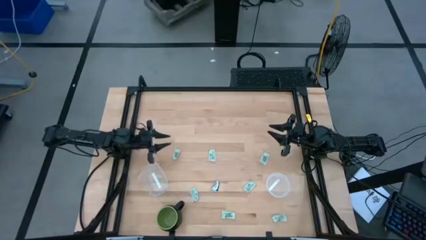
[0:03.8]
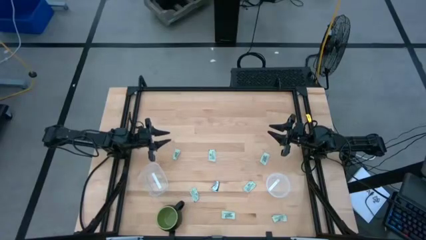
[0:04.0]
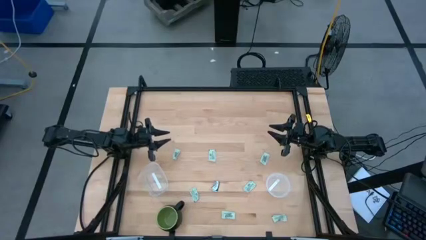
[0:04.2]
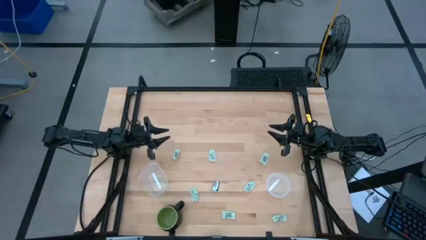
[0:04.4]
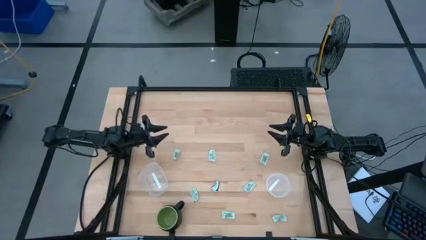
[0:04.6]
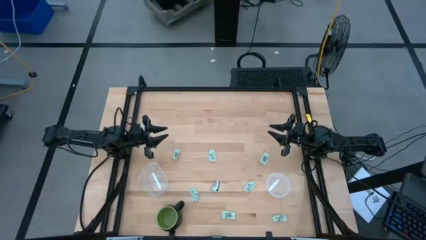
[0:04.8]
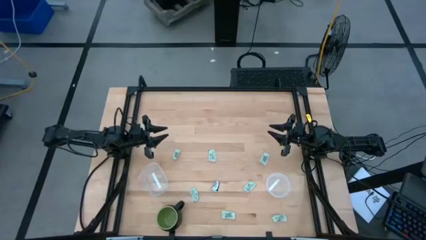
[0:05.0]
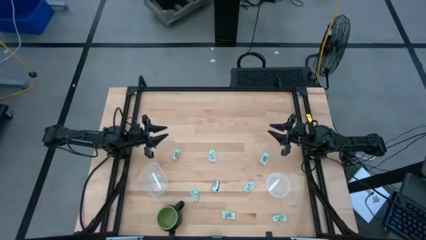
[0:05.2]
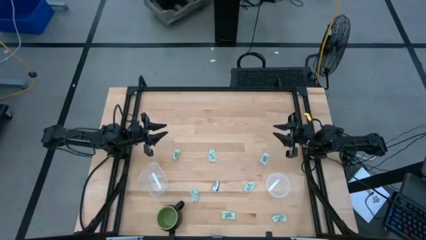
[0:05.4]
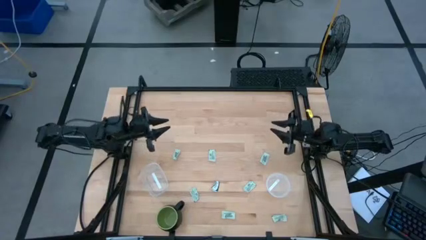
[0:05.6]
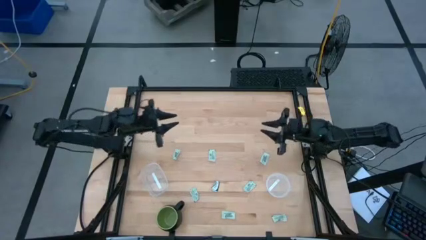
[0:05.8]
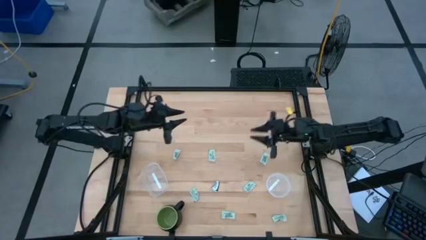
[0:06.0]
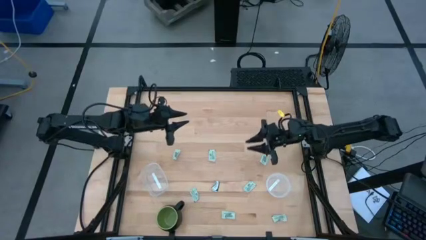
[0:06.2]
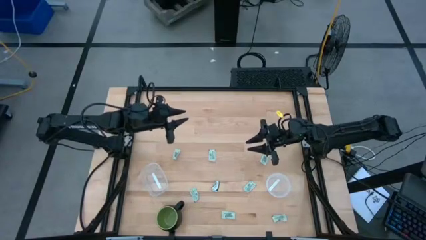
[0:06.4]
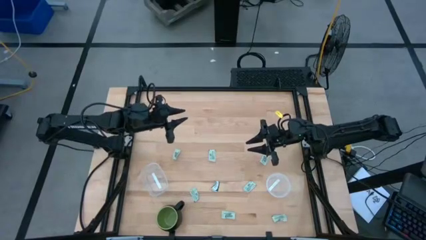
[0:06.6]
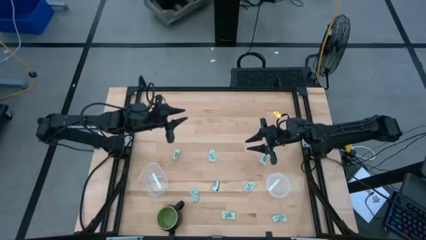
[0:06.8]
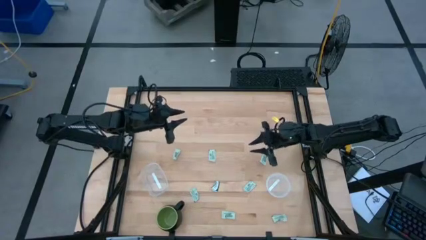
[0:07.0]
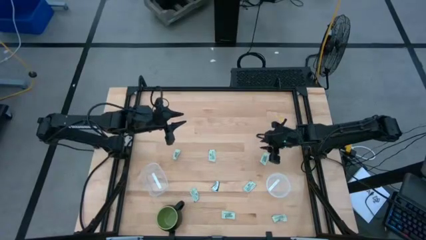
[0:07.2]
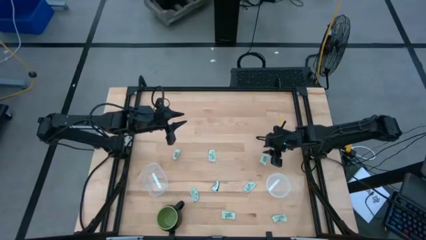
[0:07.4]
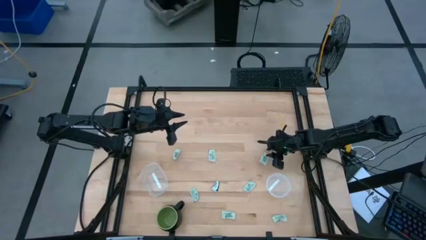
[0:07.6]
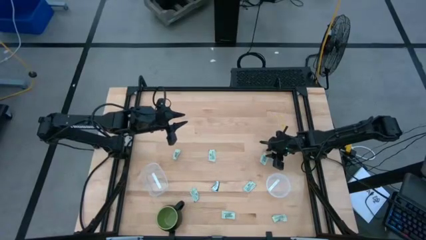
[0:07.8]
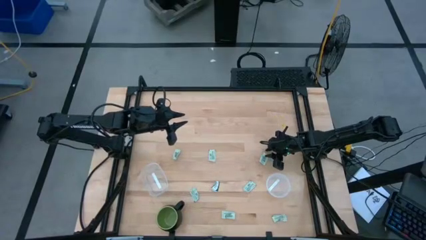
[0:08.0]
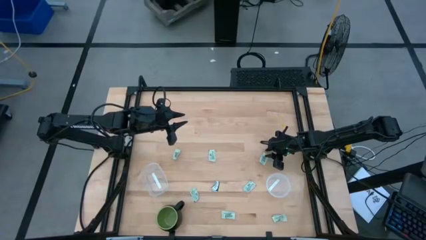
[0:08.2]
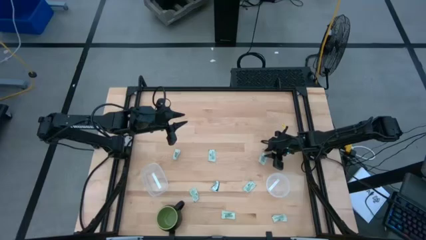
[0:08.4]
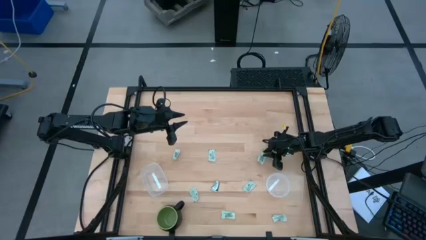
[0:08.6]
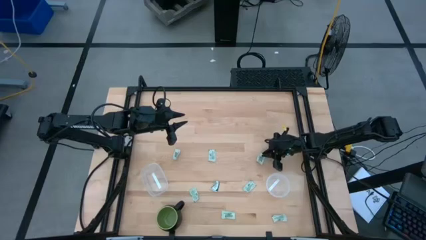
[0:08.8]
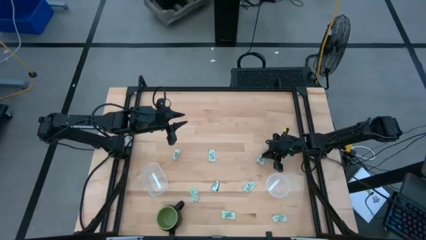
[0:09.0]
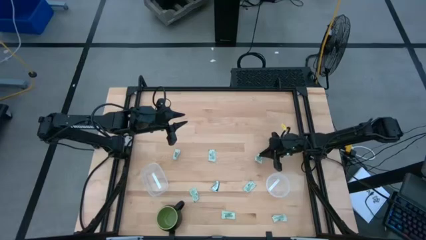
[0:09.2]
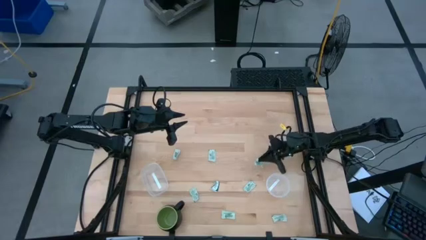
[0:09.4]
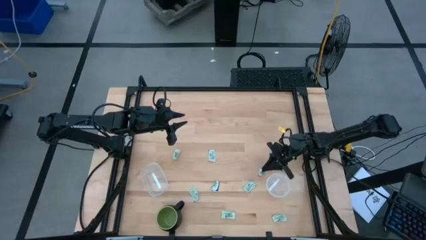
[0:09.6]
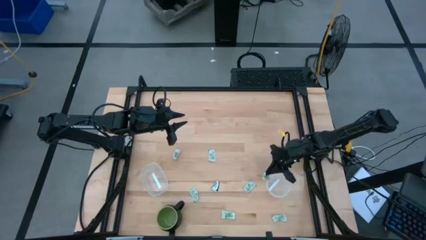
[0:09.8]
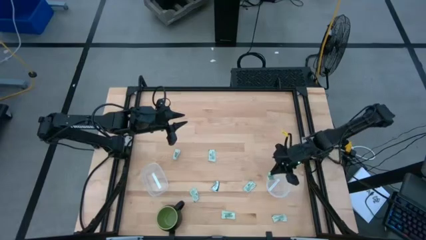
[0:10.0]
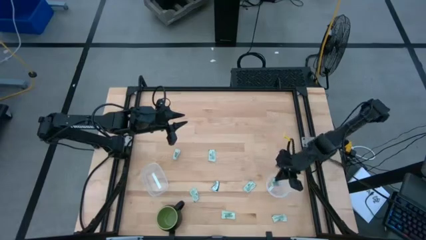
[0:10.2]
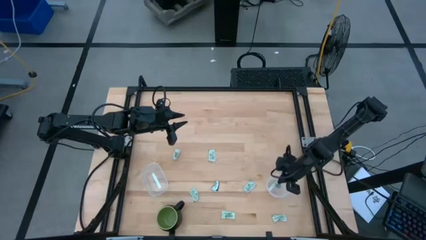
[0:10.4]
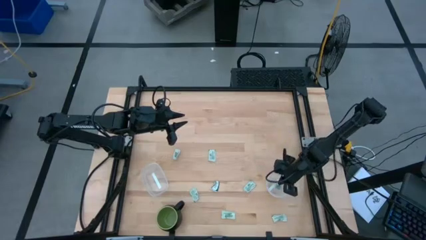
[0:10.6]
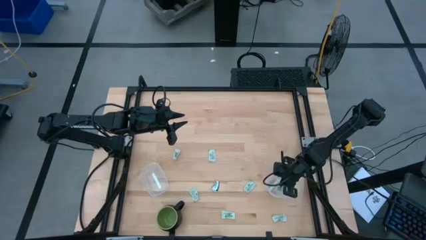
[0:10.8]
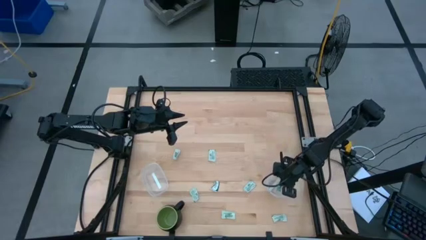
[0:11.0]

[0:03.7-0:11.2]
Task: Pick and place items into bin
Put the green stevia packet into the right transparent bin

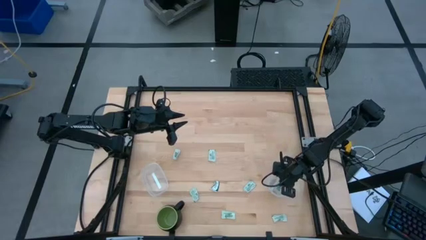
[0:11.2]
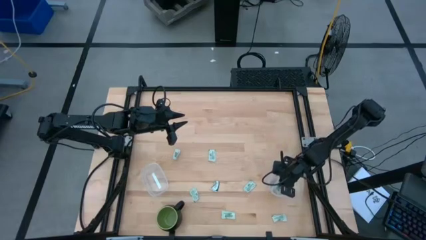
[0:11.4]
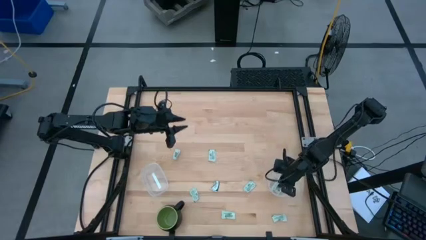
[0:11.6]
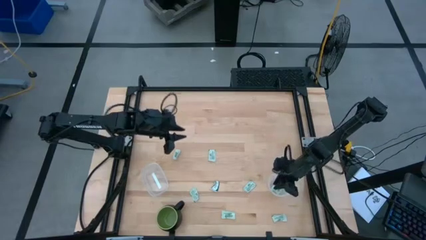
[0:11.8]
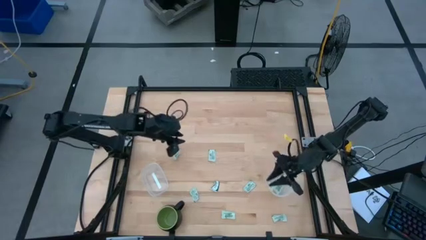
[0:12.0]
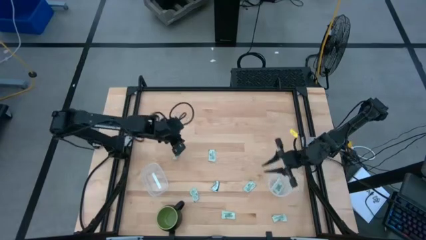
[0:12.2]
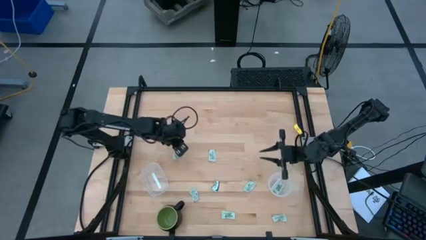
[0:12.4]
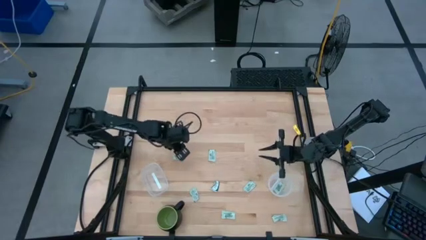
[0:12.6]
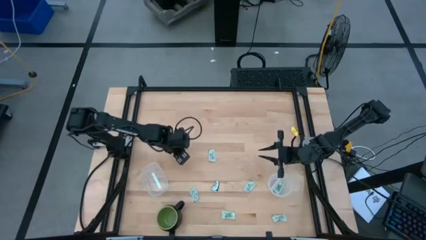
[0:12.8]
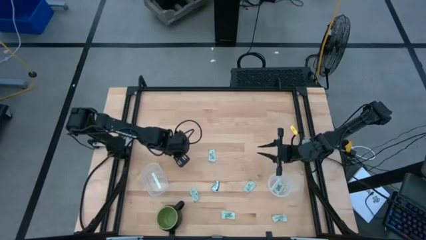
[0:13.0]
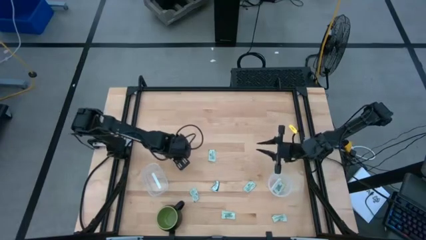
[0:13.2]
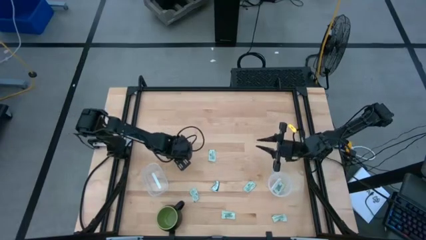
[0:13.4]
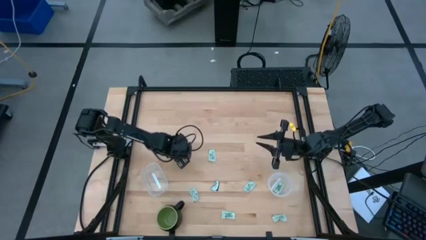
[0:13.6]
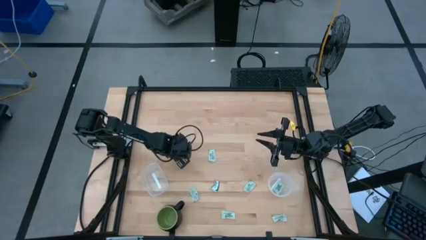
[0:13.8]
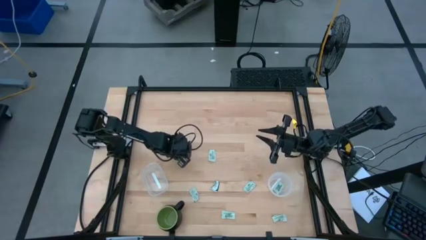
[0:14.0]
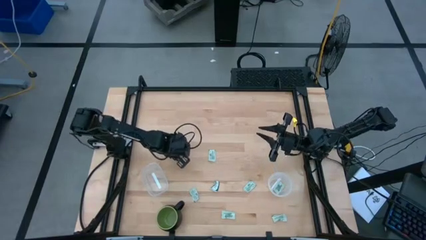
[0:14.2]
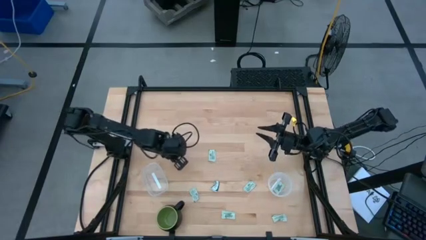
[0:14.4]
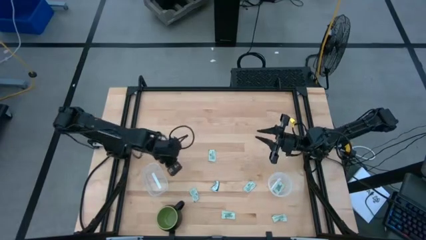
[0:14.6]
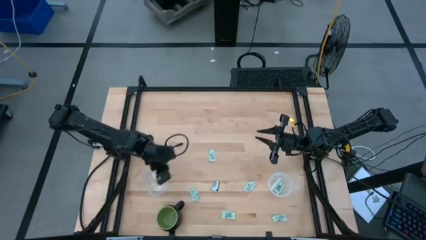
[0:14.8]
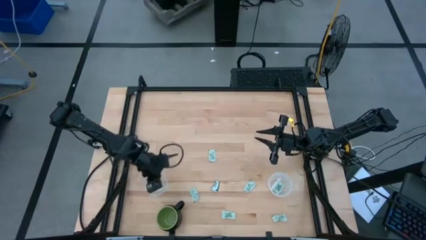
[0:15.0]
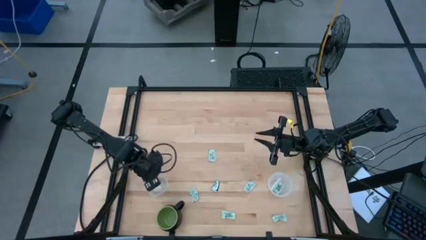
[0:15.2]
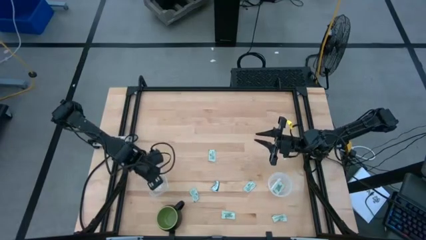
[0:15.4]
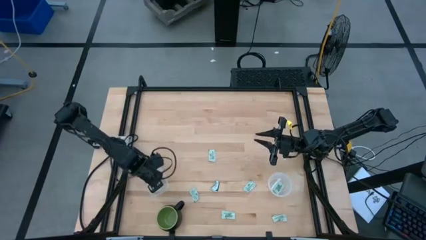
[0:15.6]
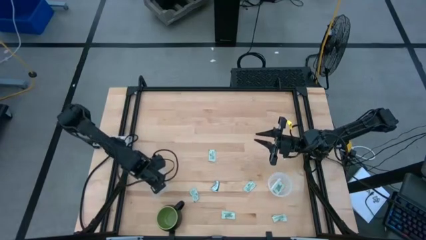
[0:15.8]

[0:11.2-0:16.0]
Put the green stevia packet into the left transparent bin

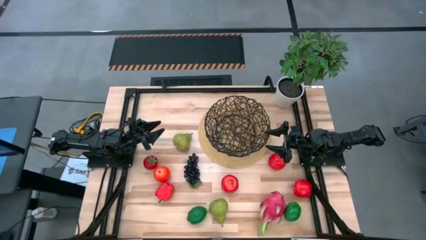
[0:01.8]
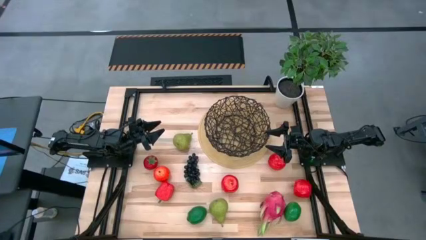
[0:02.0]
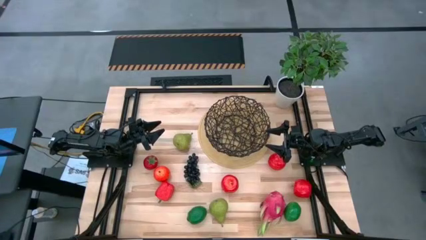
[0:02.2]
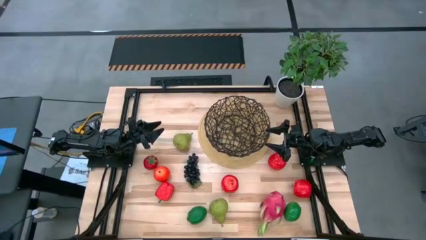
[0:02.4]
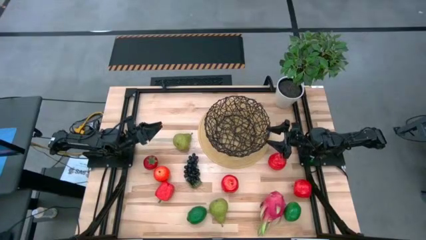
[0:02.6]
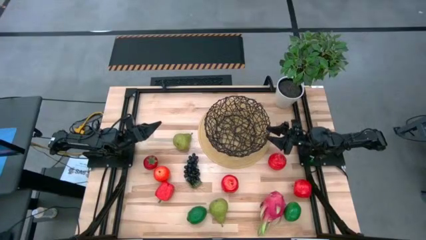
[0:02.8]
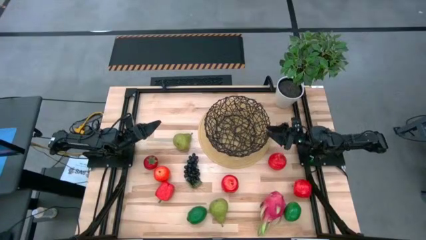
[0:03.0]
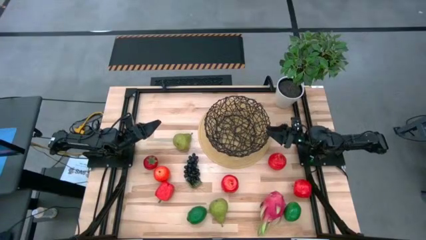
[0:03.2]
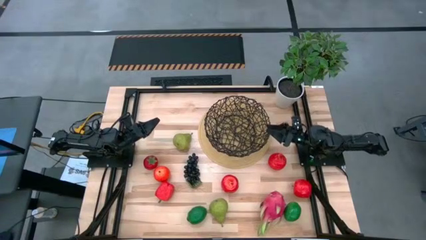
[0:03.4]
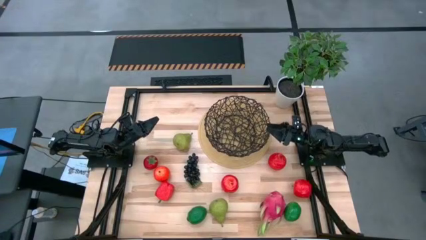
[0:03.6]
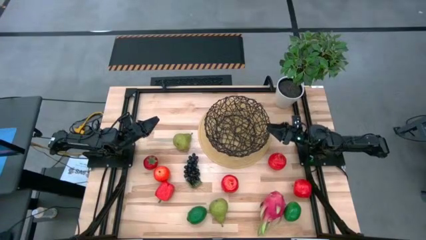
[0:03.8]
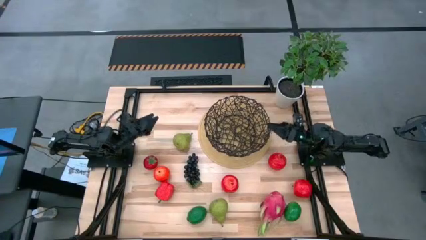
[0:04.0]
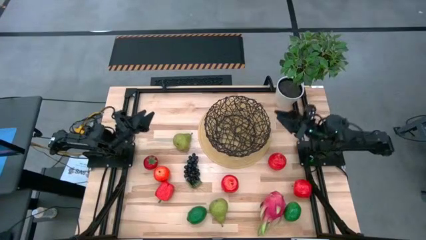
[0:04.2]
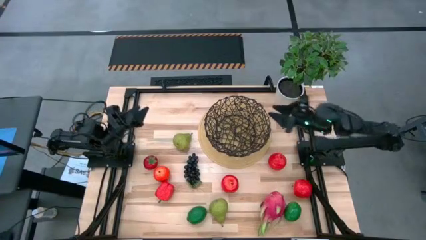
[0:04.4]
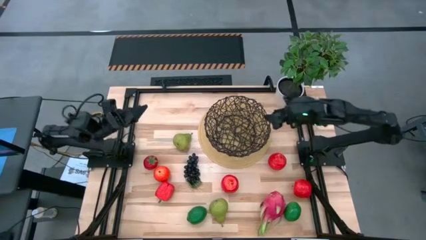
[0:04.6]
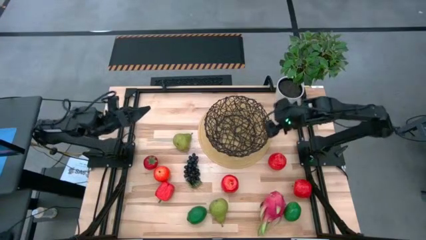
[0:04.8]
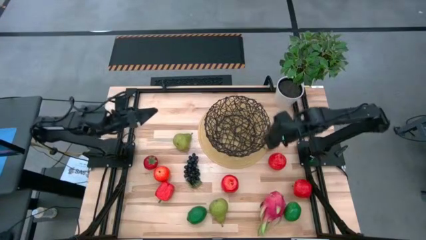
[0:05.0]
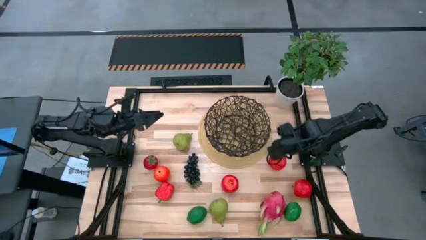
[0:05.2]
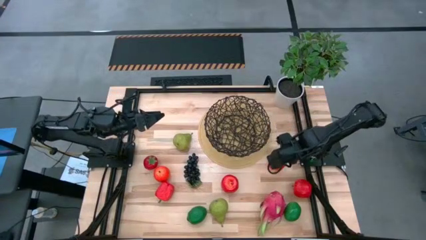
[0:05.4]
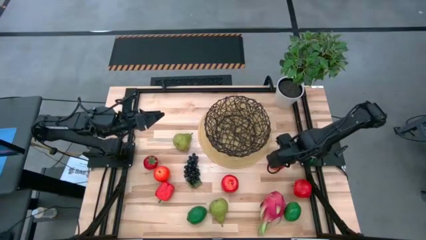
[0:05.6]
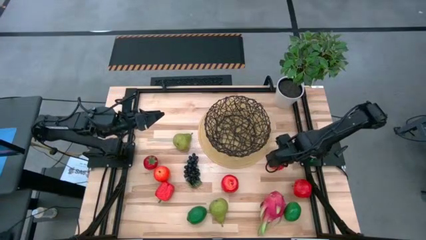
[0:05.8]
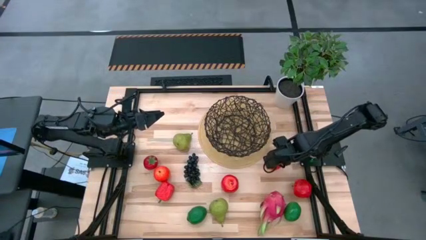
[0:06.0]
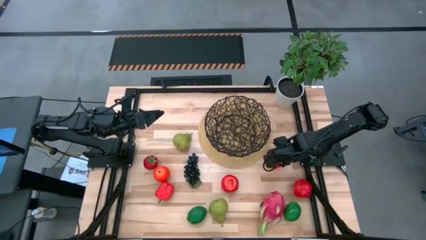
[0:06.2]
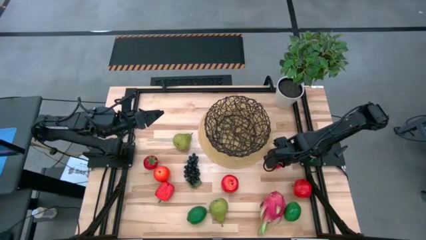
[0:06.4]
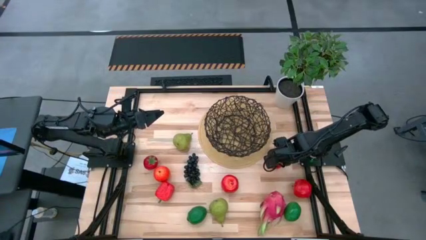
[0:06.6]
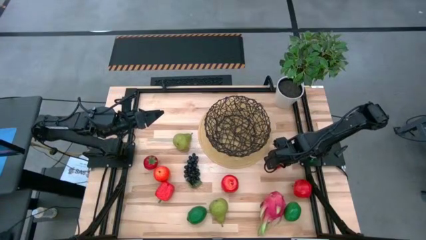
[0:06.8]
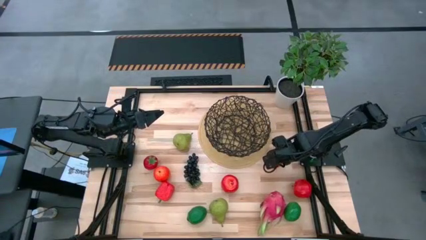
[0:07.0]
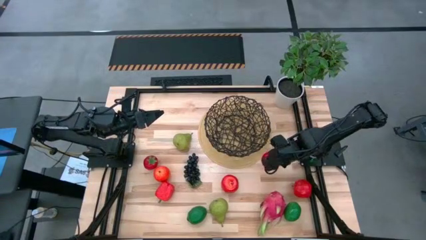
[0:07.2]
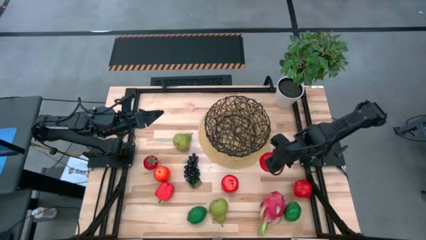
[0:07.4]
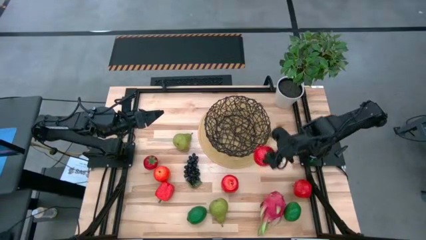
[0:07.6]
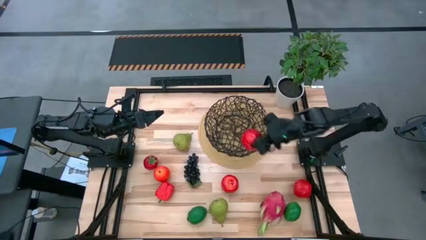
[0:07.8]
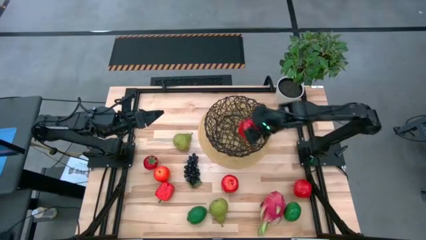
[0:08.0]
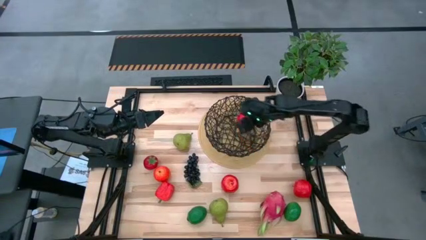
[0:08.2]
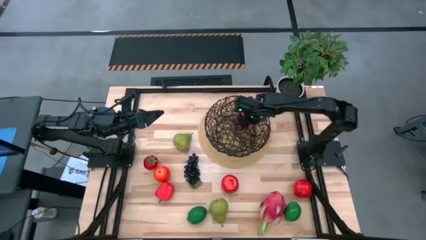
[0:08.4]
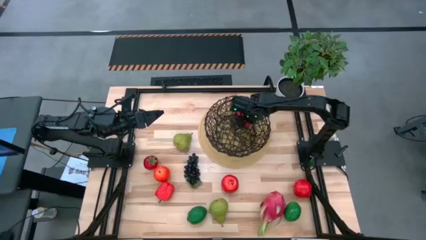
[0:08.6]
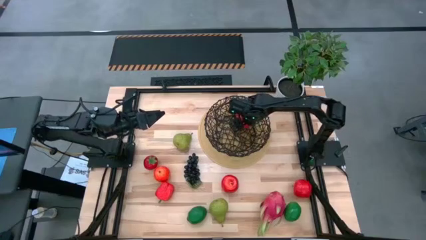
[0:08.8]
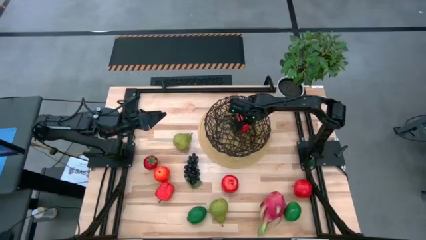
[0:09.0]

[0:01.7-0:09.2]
Task: Build produce basket
Put the red apple into the black basket
